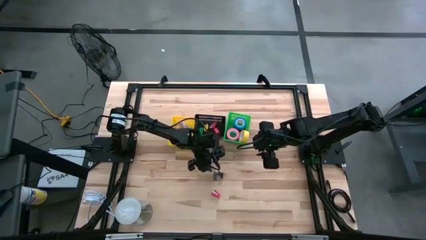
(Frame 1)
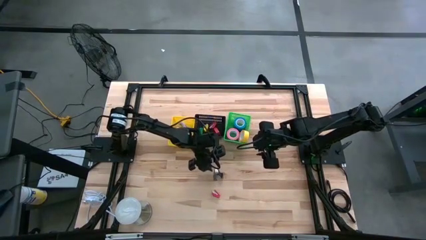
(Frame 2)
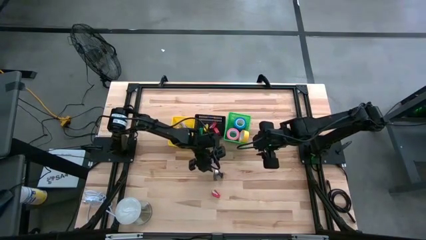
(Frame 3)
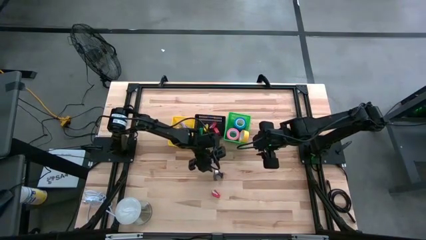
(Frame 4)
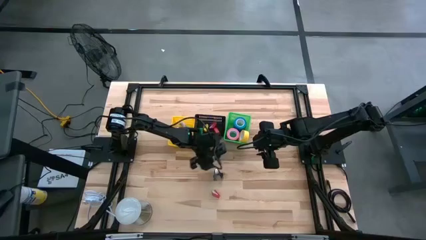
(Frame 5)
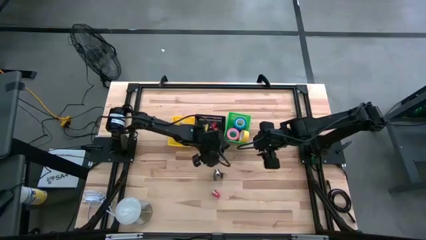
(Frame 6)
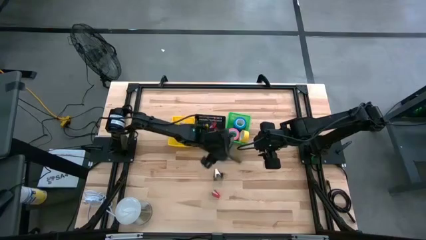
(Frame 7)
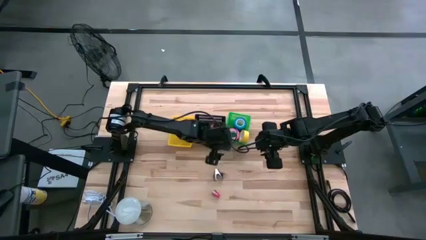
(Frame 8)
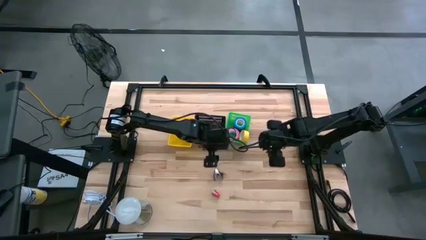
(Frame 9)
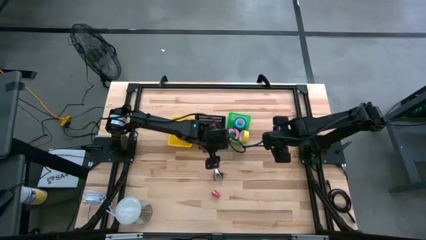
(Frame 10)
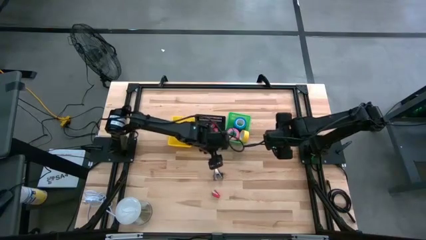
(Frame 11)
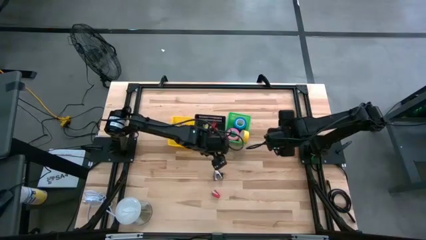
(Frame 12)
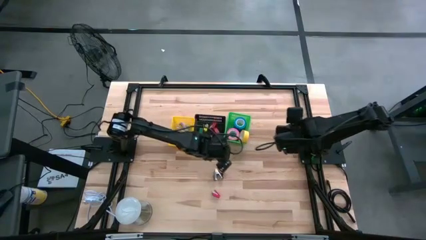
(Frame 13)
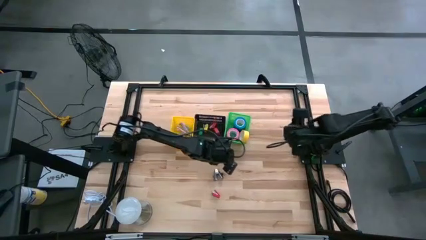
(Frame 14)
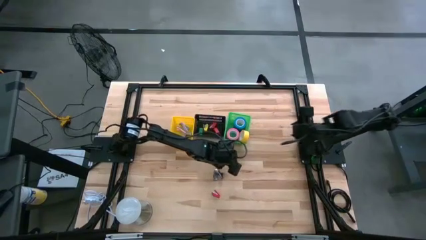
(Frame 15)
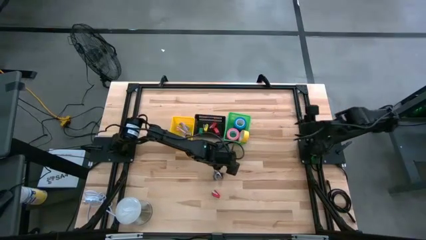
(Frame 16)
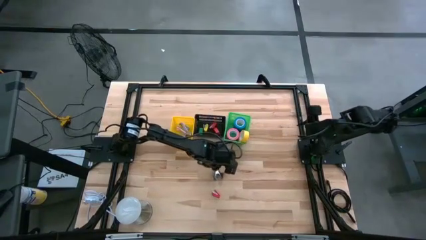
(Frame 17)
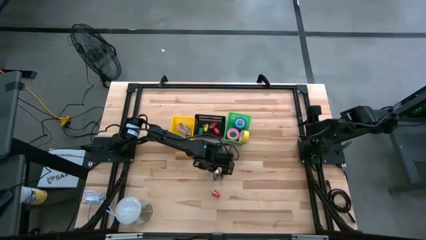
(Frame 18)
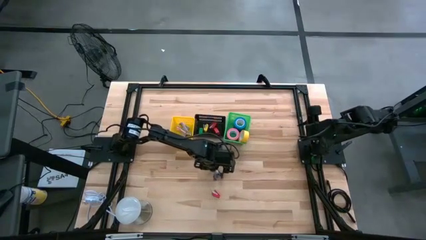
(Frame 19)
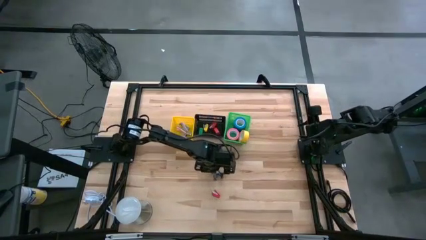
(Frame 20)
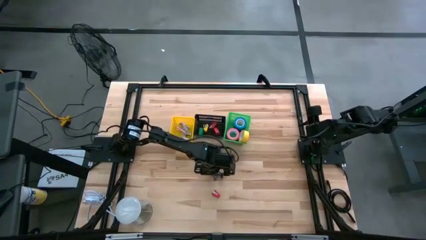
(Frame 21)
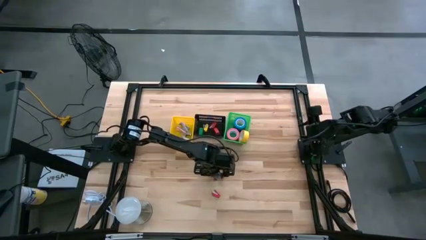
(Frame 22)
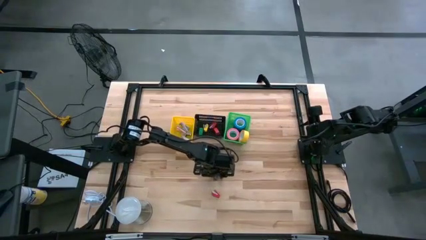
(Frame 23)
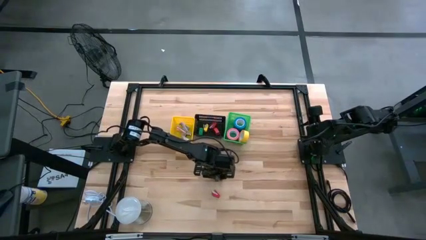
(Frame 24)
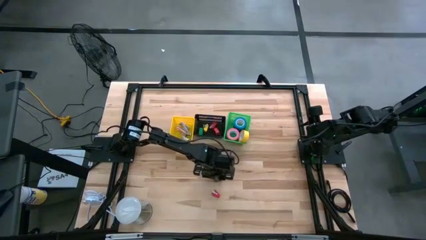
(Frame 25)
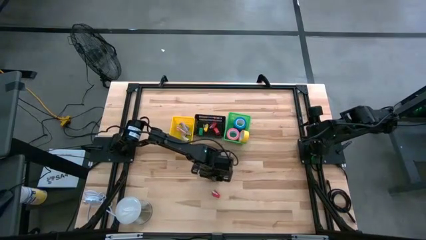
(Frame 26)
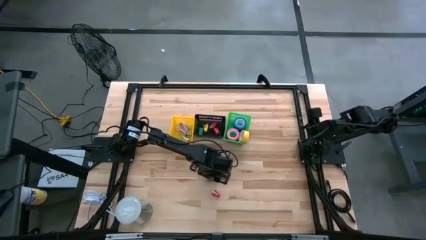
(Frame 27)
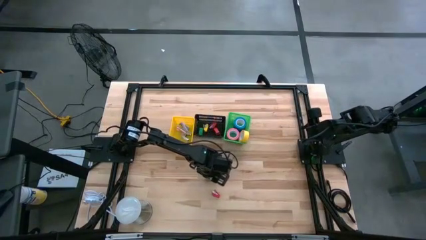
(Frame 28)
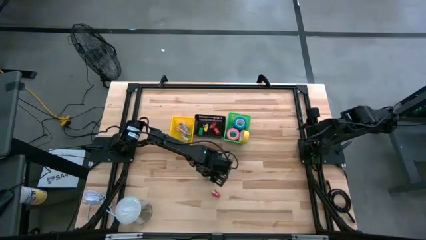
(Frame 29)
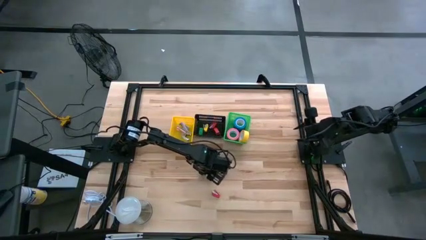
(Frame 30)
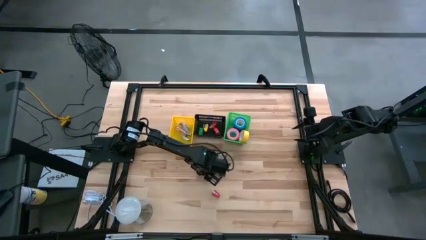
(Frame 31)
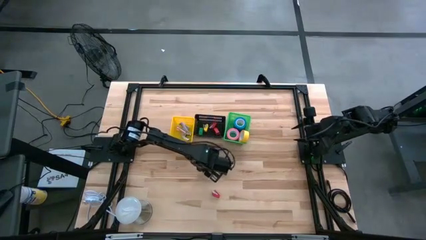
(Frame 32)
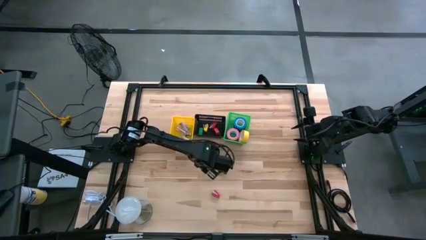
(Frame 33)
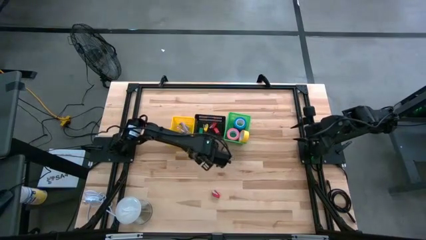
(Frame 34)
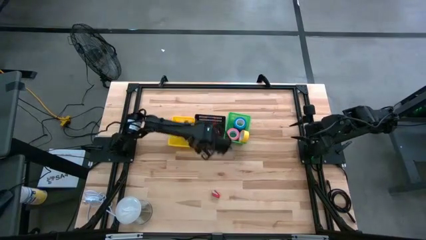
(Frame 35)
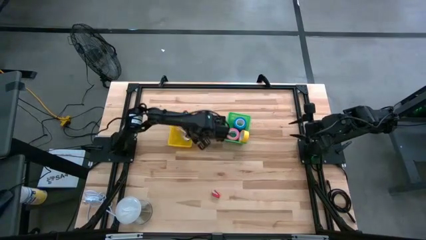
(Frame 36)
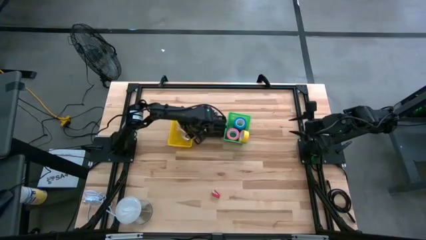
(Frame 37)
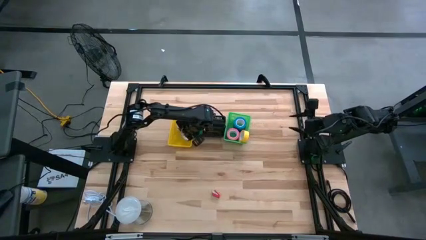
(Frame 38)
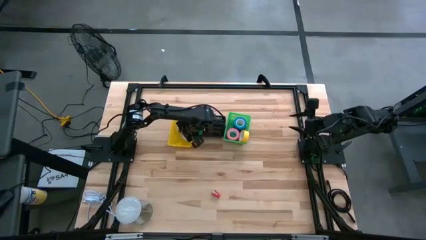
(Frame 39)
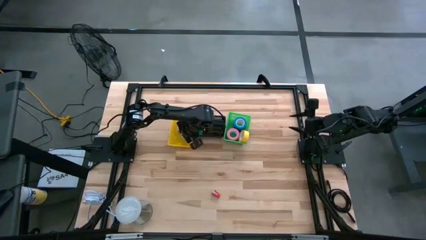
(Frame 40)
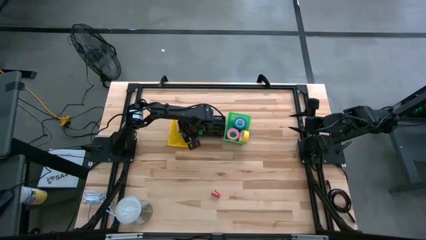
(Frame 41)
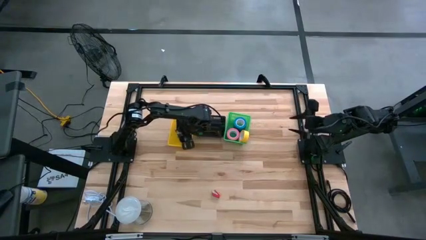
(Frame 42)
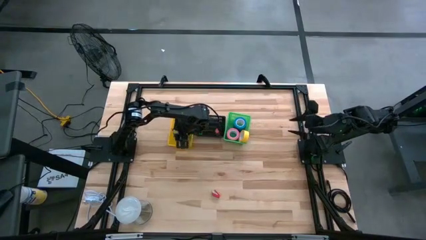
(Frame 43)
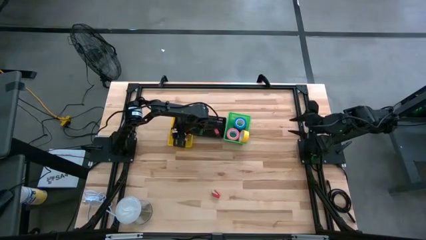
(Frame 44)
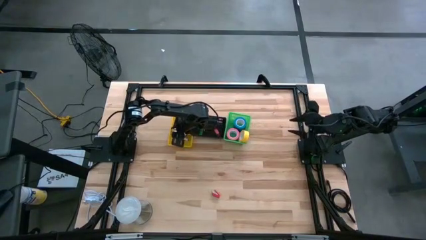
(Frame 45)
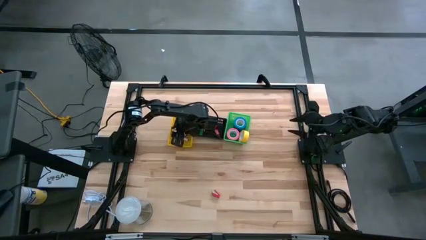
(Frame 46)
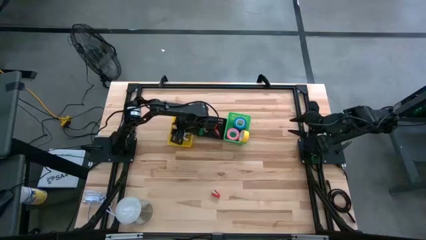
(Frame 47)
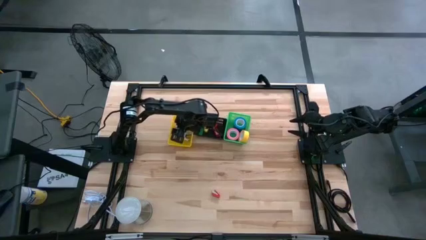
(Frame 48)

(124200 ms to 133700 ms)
Task: Pick and place Stapler, Stapler remover, tape
Put the black staple remover into the yellow bin

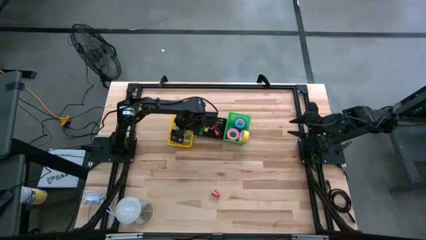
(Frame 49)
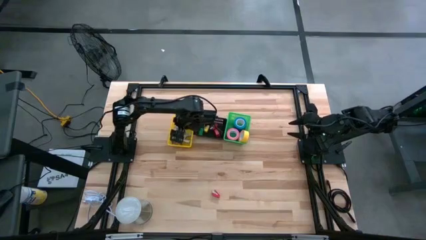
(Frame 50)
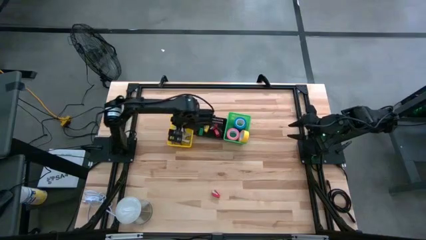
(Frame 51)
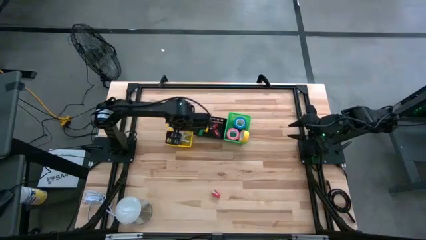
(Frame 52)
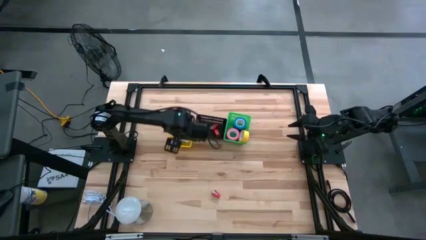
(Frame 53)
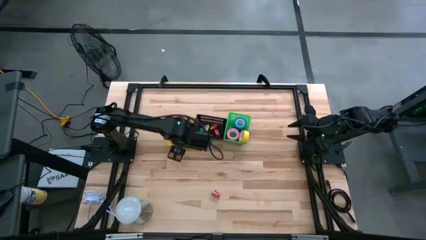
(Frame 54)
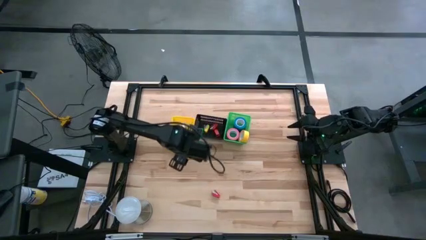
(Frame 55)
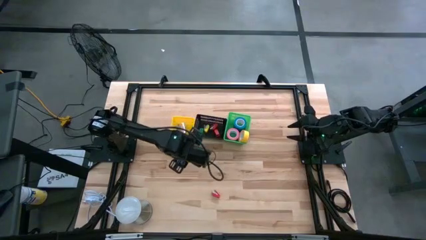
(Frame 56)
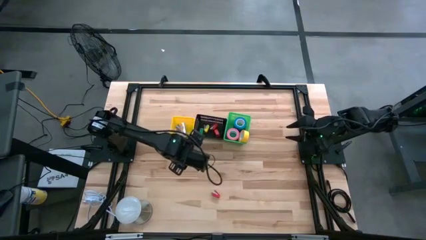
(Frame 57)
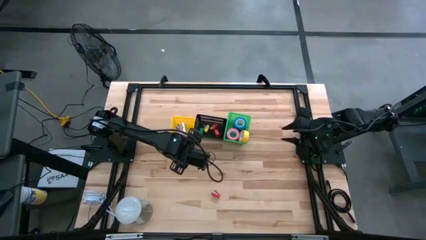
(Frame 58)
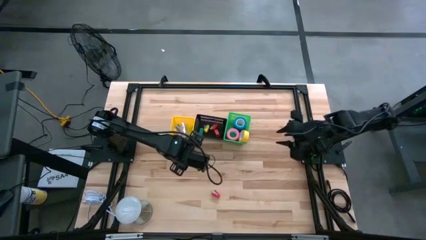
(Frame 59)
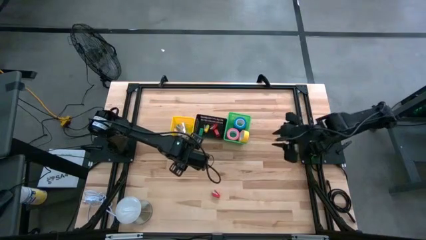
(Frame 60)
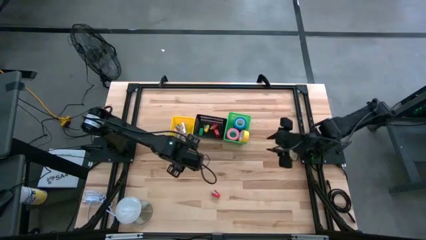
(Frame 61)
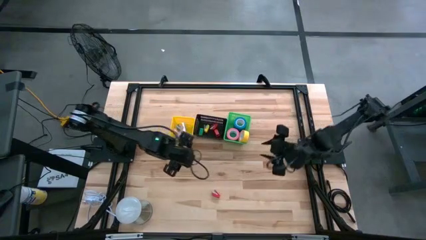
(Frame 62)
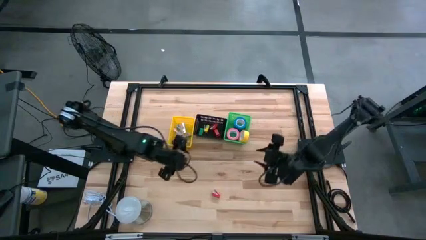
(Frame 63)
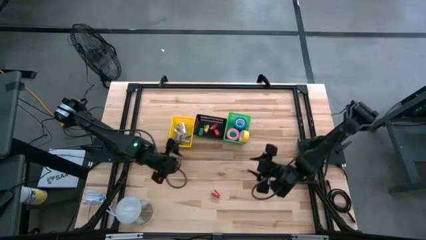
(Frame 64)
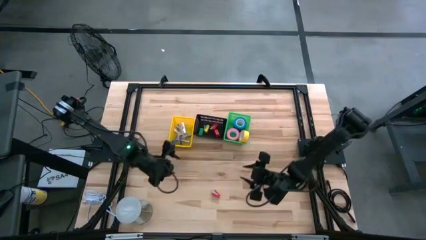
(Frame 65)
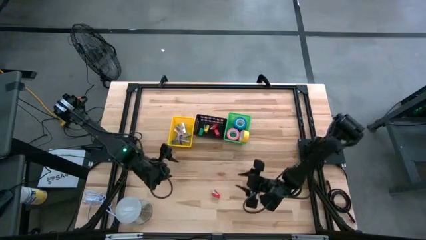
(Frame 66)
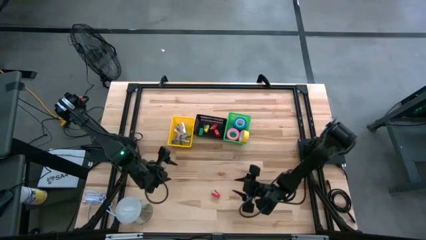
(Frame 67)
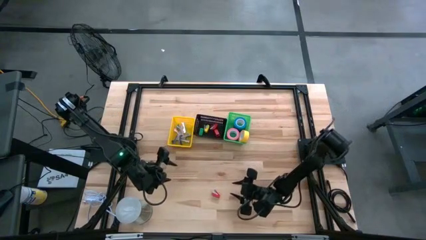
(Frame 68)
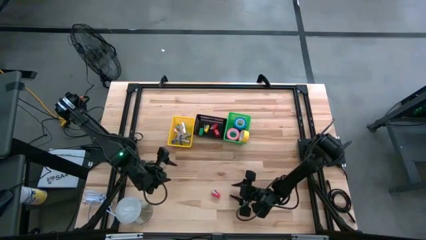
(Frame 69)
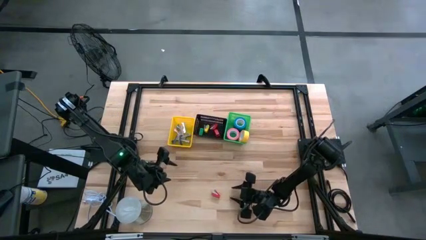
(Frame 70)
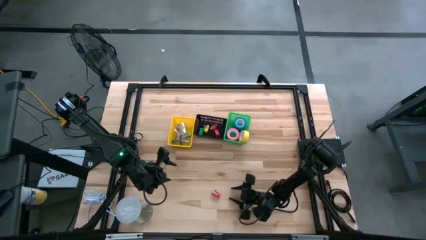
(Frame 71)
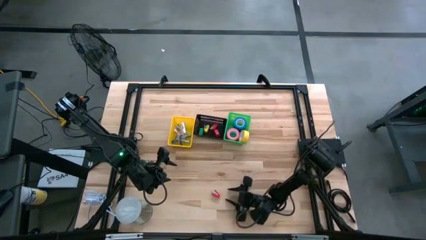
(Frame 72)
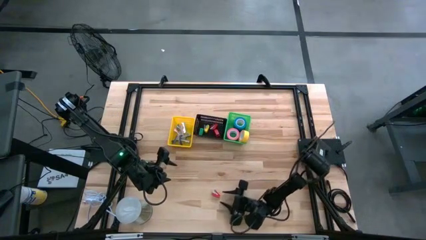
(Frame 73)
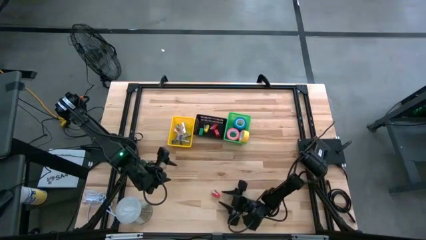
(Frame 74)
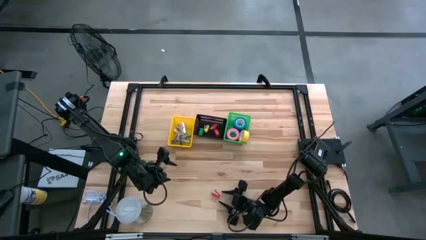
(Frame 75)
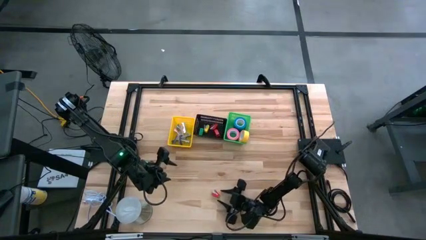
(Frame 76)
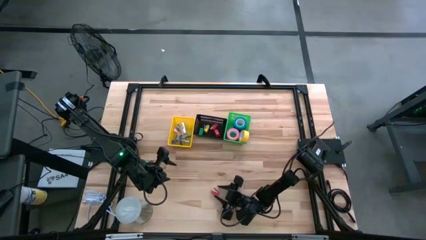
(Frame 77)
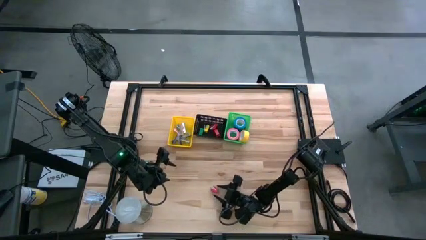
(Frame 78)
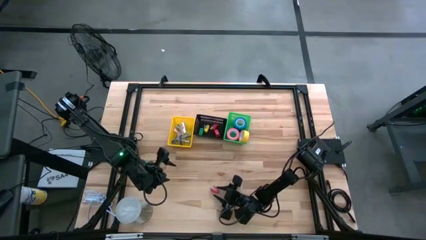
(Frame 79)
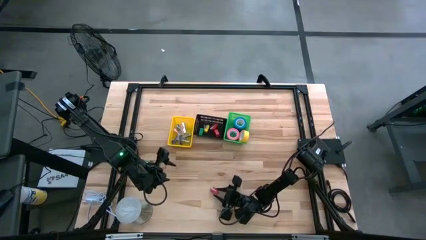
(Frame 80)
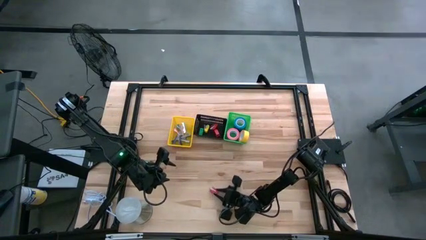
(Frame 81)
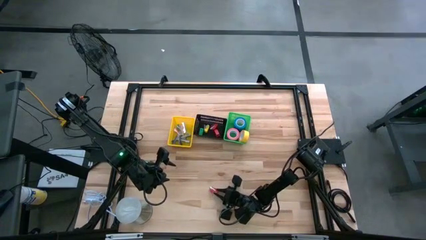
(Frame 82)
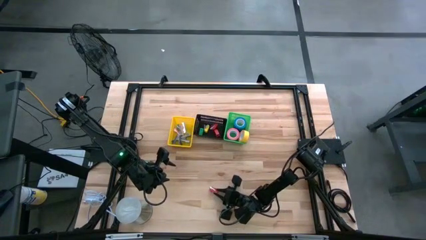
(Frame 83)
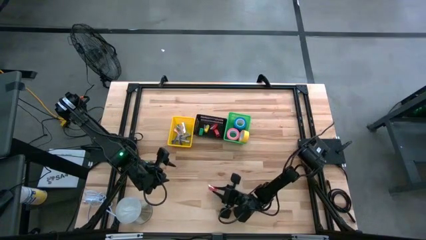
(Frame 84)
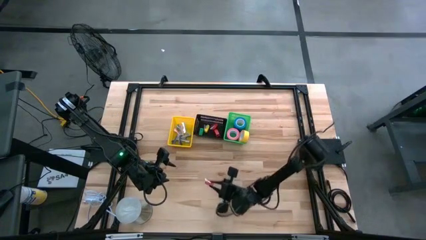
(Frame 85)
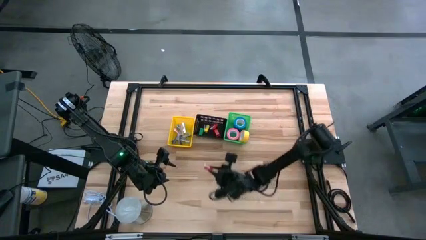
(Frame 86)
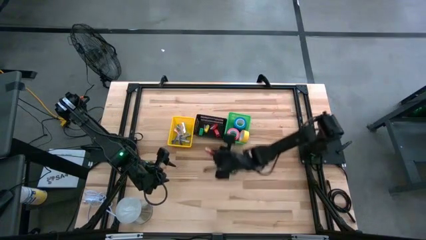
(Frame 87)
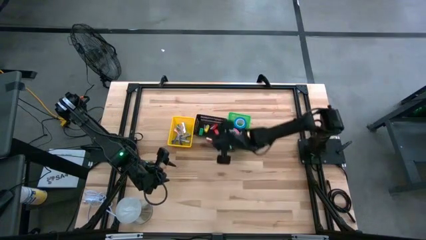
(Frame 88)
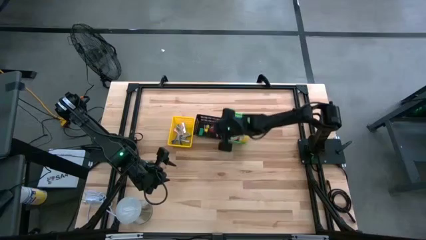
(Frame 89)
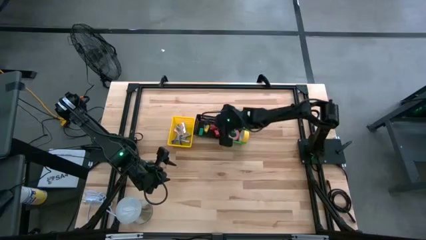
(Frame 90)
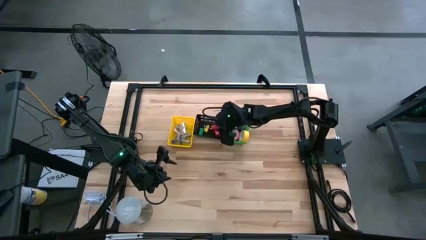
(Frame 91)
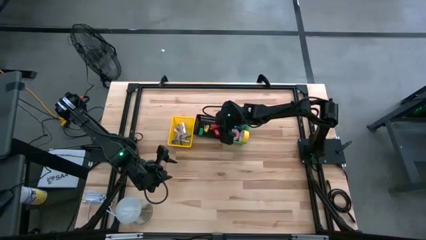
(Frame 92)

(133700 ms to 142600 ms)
Put the red stapler into the black bin
